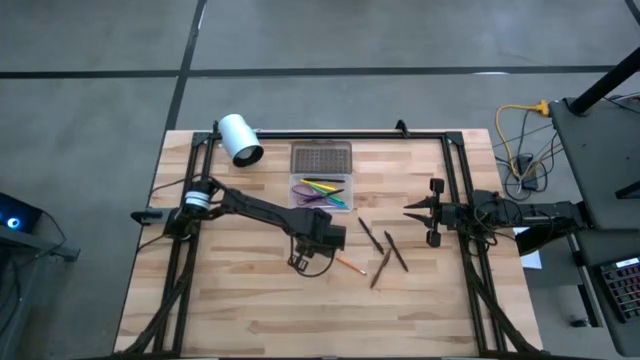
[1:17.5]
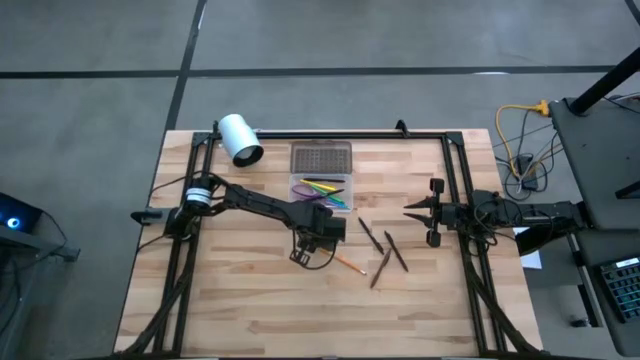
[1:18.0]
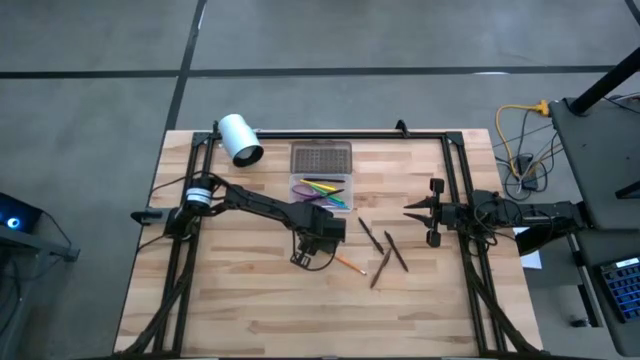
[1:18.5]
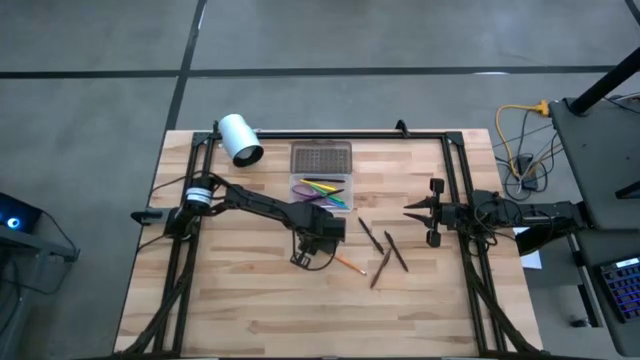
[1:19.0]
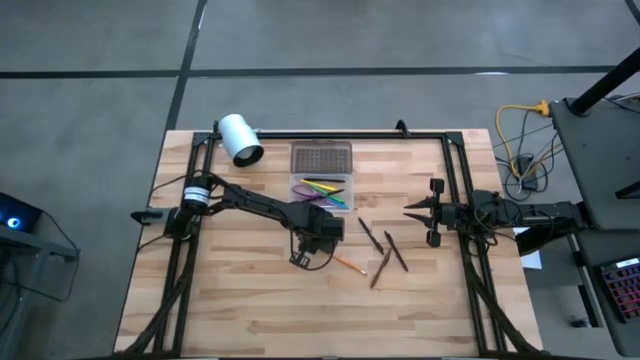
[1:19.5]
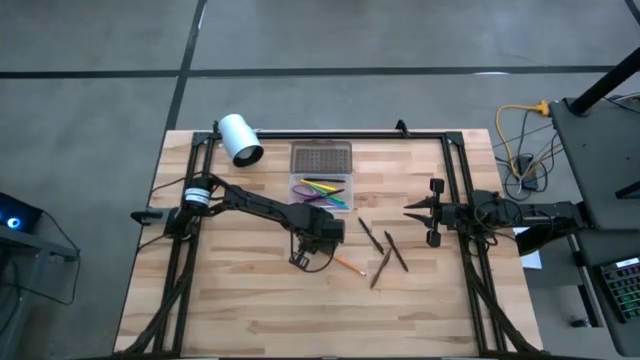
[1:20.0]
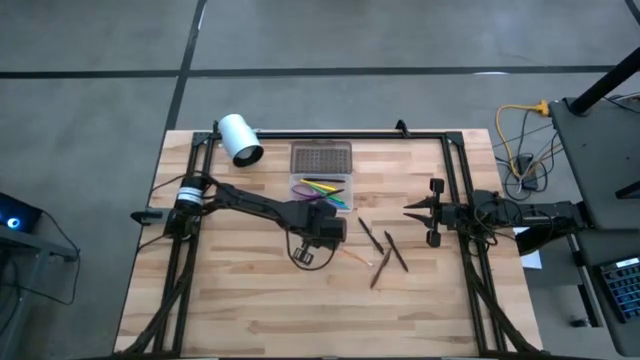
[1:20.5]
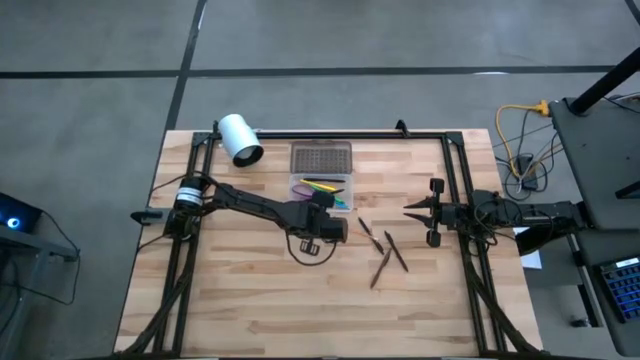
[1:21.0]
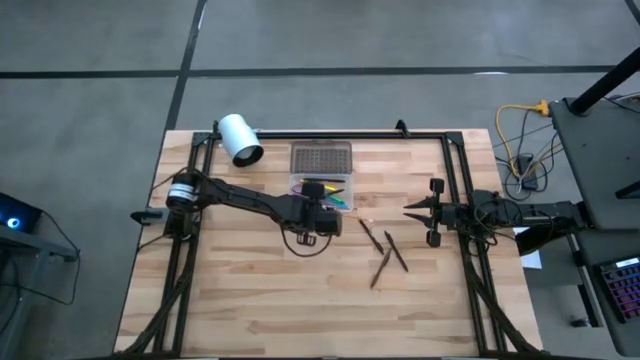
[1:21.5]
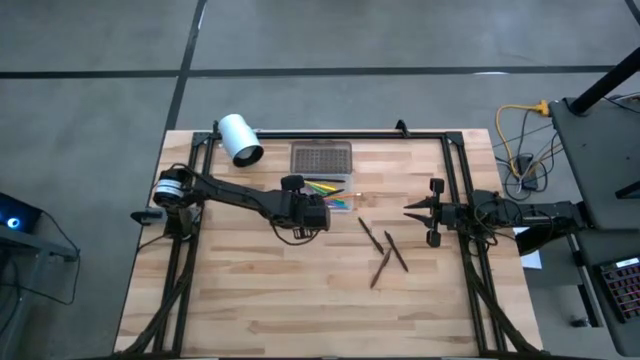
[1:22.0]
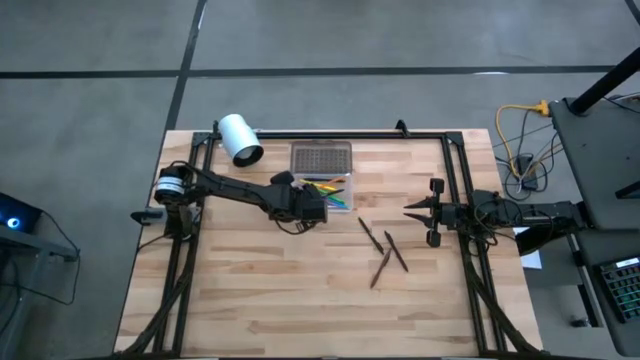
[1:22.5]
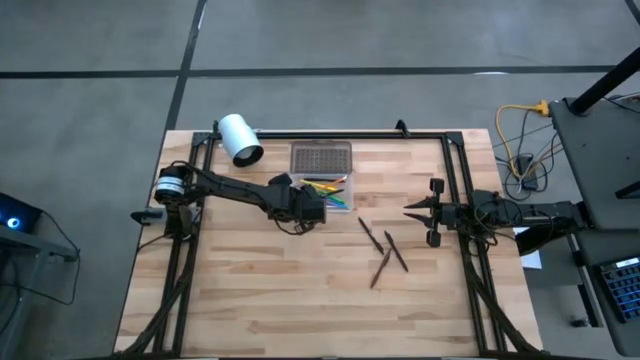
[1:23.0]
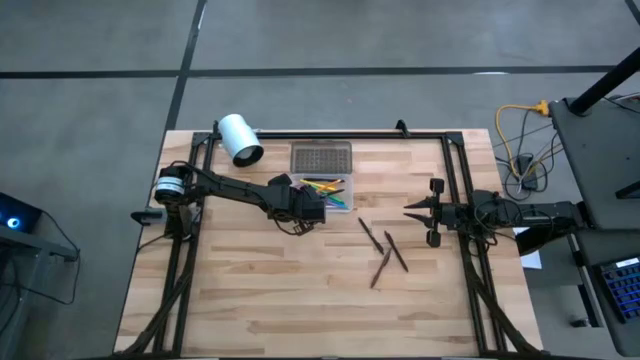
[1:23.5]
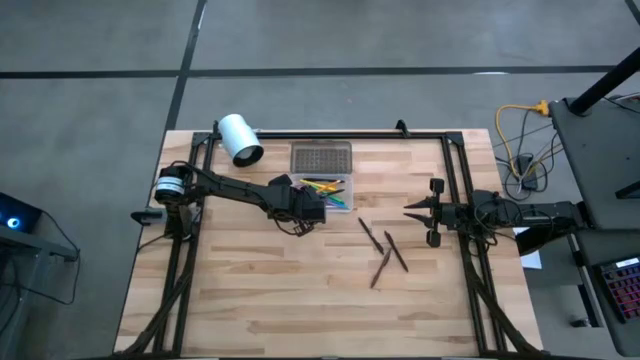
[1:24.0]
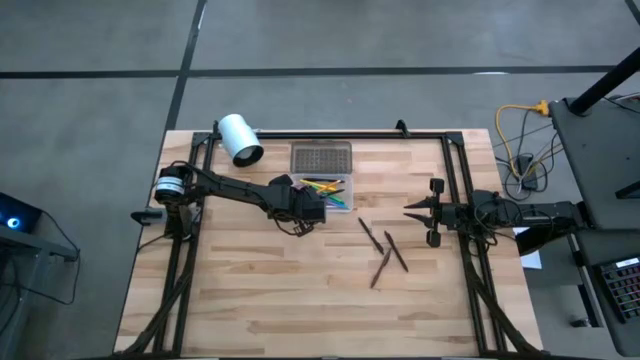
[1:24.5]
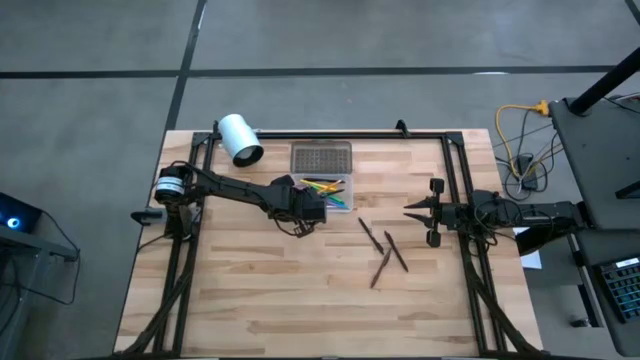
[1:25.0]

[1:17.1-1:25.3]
Task: Pick & place school supplies into a supply box
Put the orange pencil into the supply box

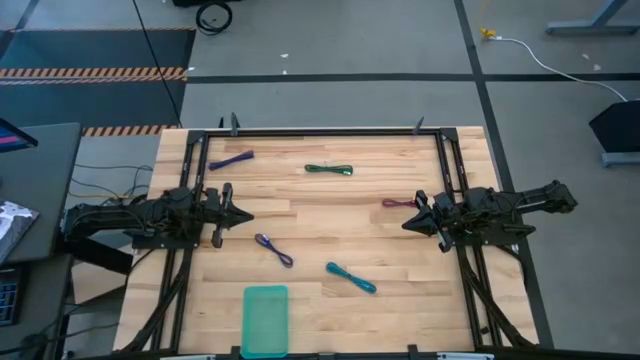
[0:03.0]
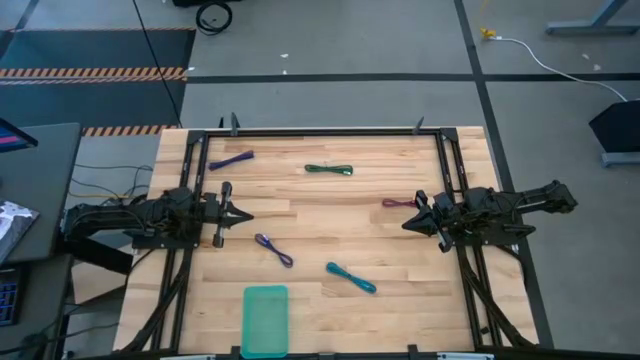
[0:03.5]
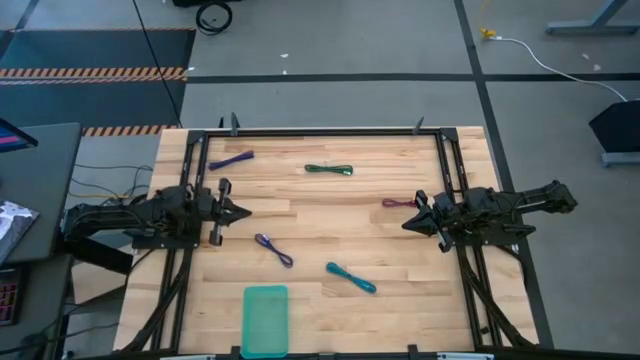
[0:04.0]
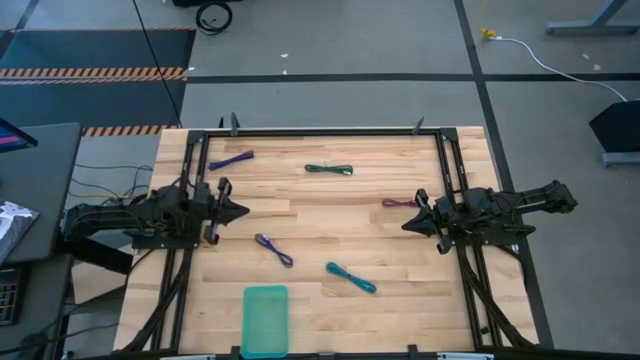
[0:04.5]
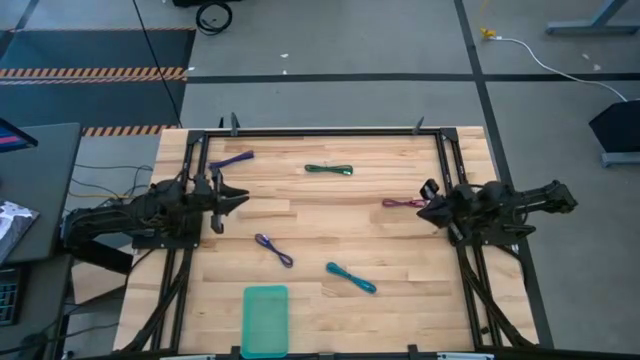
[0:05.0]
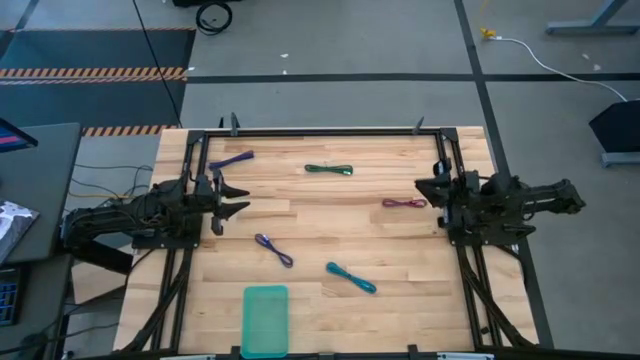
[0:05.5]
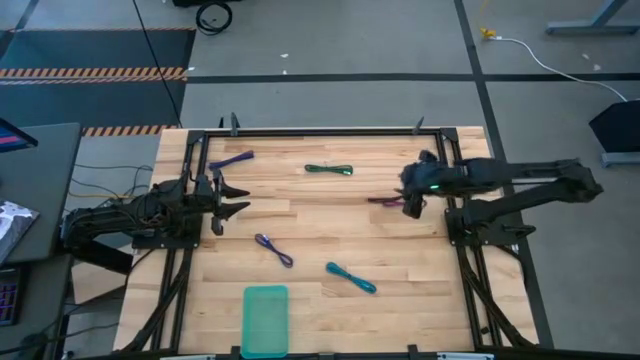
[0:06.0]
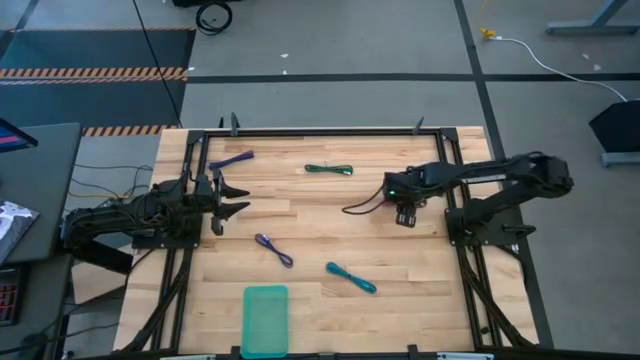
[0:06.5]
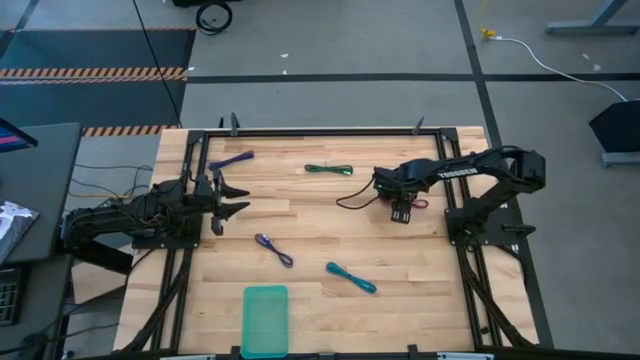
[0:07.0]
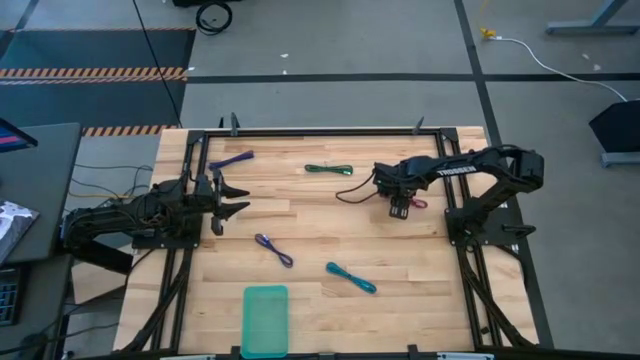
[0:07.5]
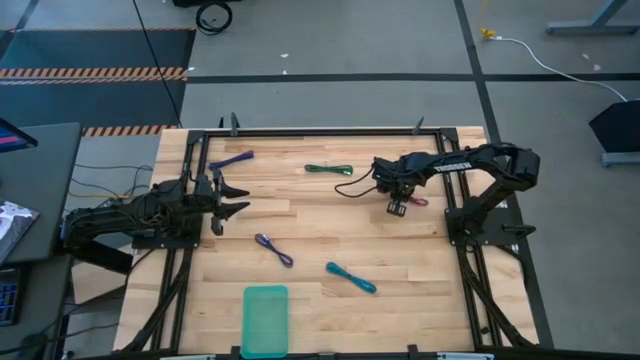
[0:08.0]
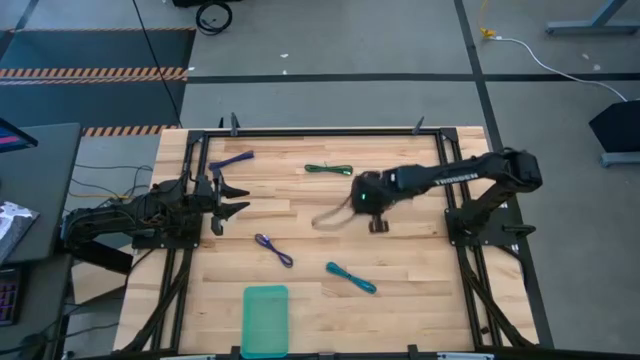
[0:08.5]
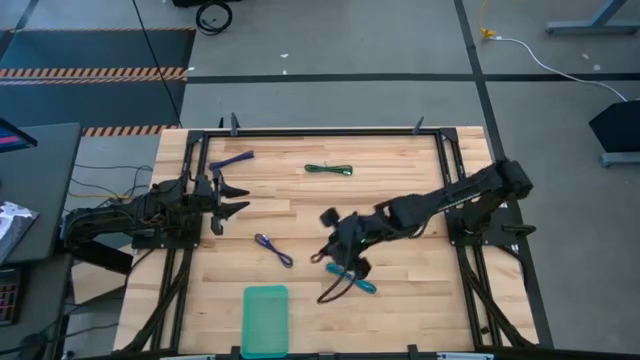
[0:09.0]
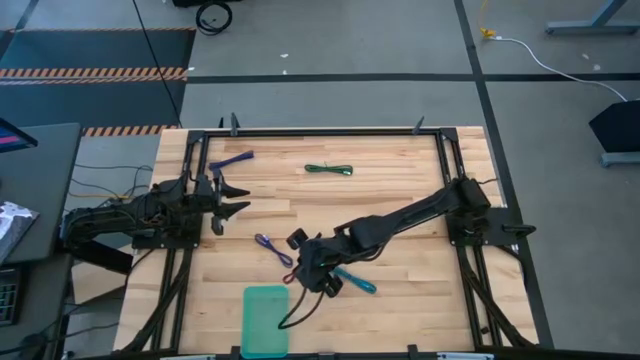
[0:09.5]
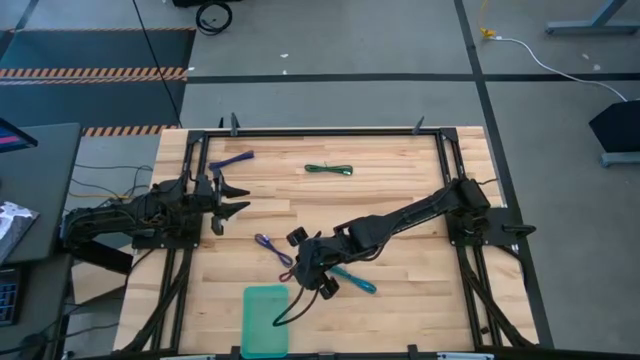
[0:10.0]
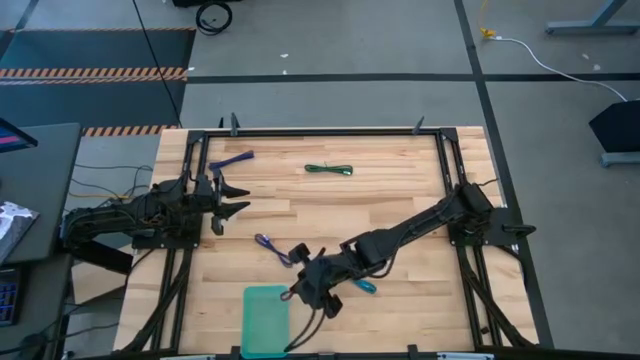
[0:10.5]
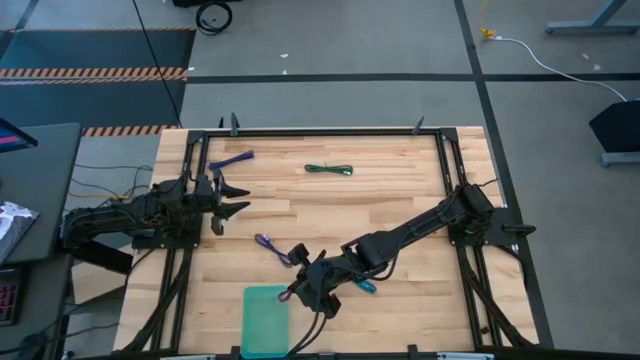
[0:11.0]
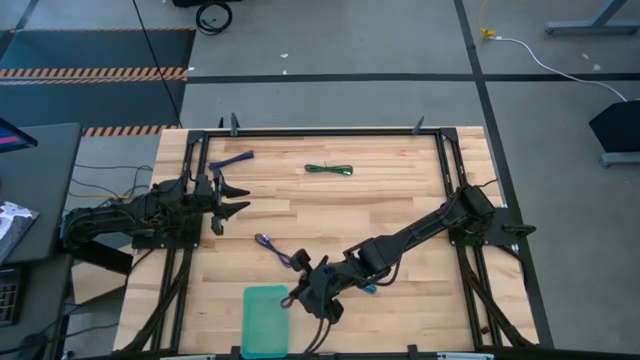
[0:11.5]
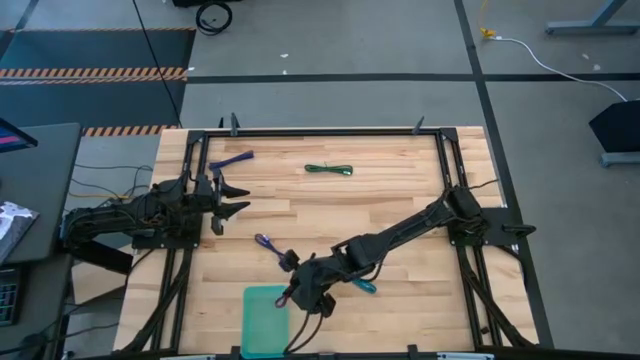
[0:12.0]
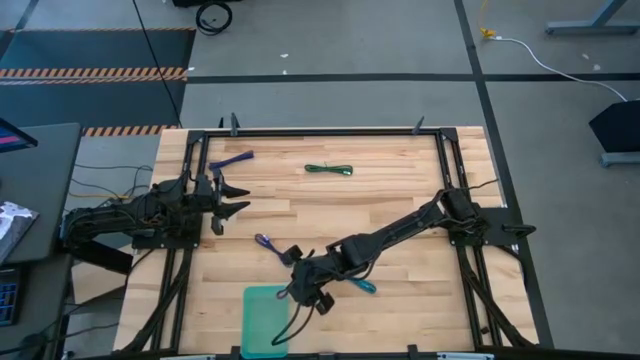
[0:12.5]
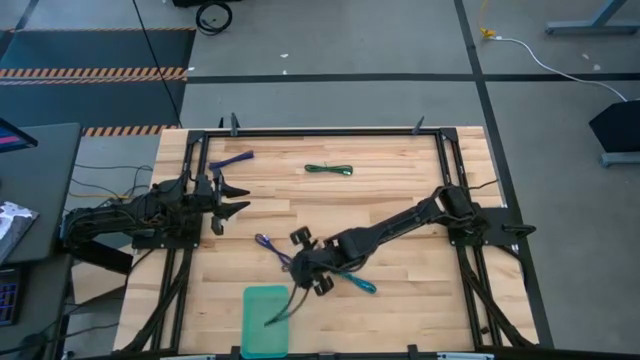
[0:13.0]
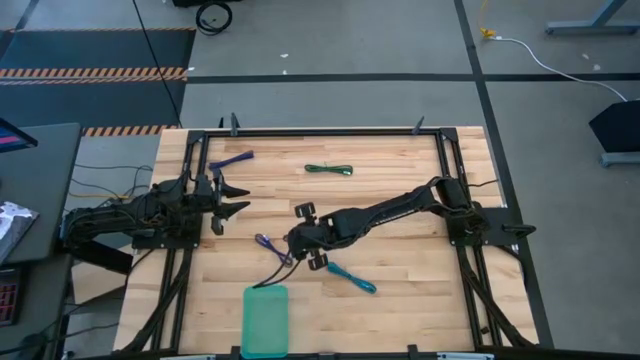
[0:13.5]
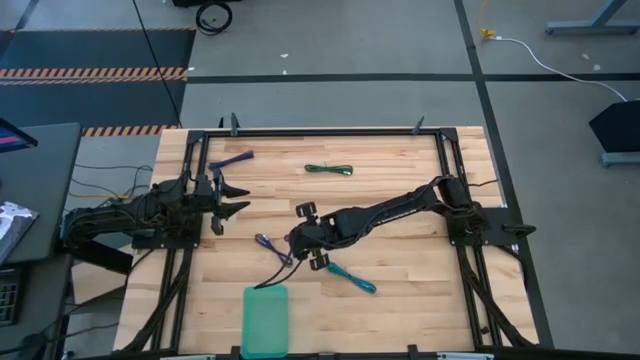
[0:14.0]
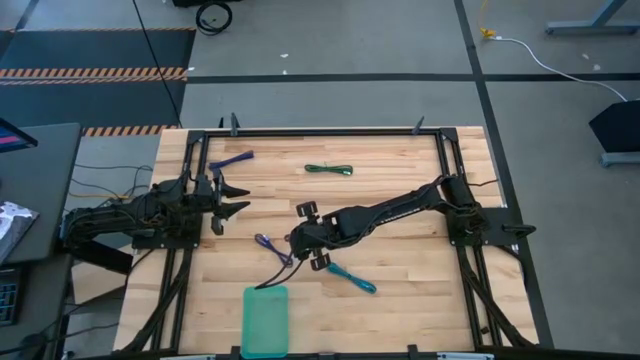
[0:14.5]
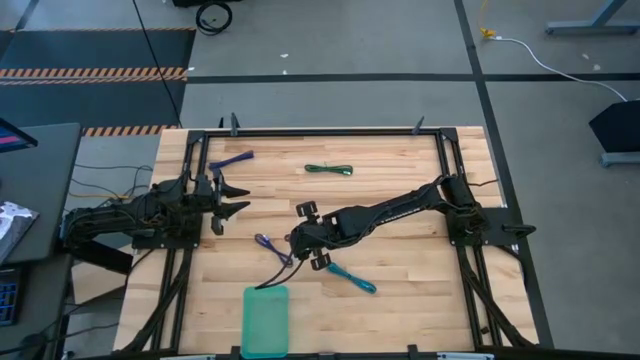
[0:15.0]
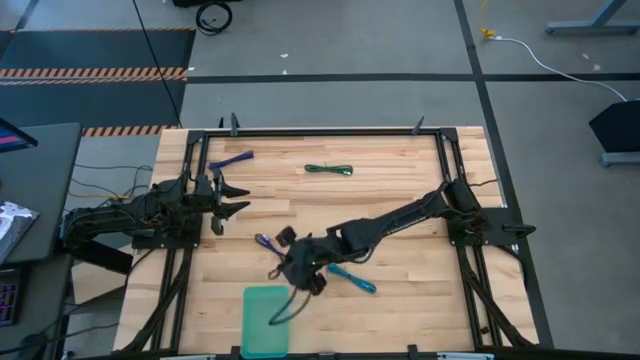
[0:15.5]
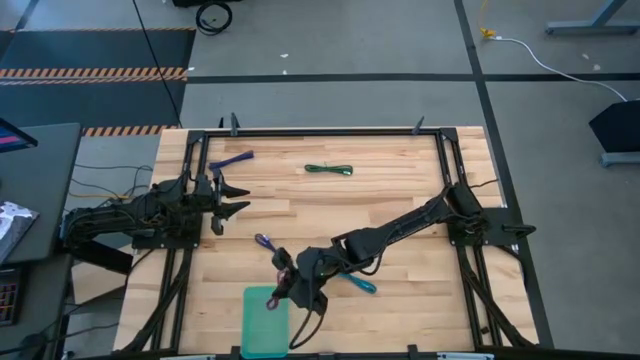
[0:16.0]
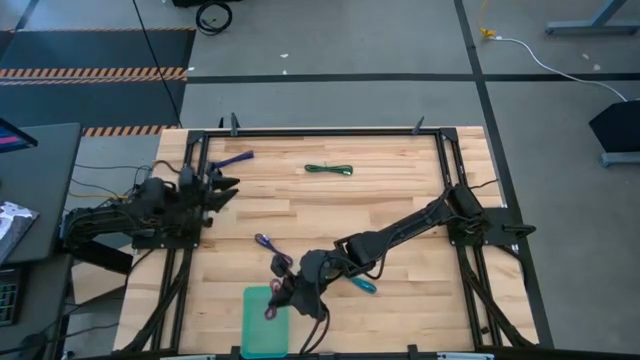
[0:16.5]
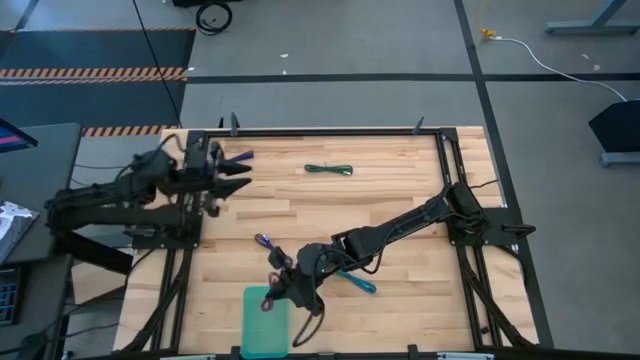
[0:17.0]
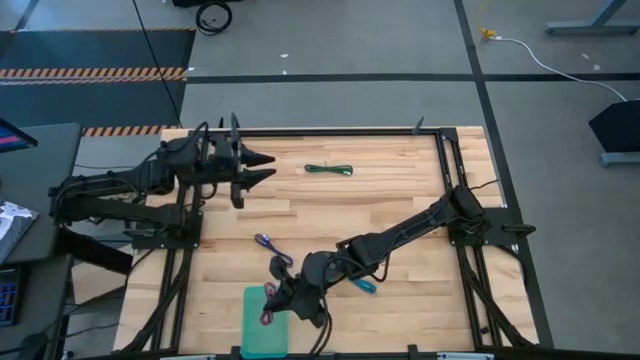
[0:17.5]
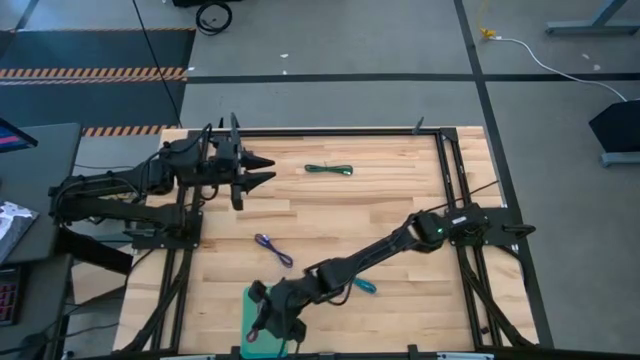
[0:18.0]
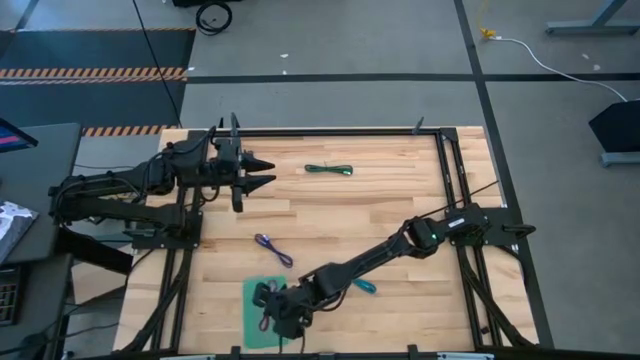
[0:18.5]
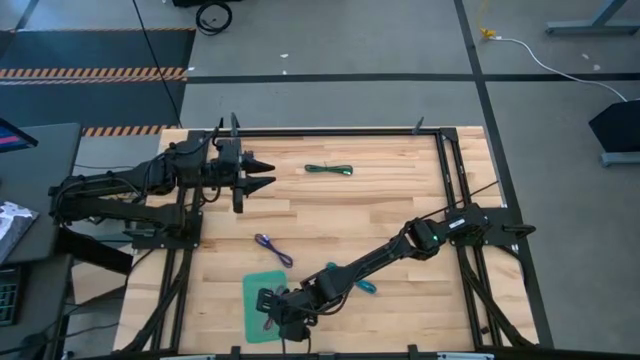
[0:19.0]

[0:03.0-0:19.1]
Task: Pick and place USB-C Cables
Put the pink charger cable into the green bin
